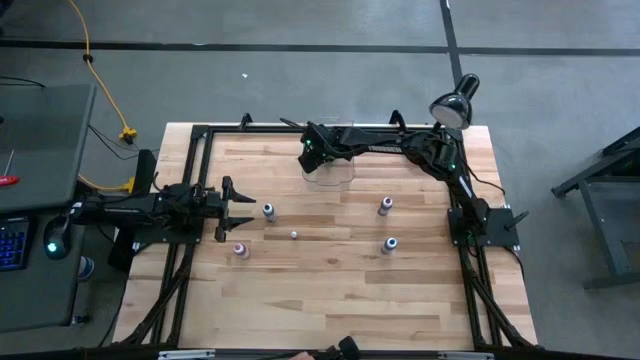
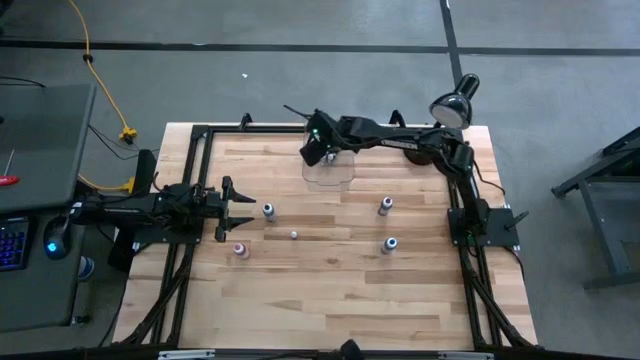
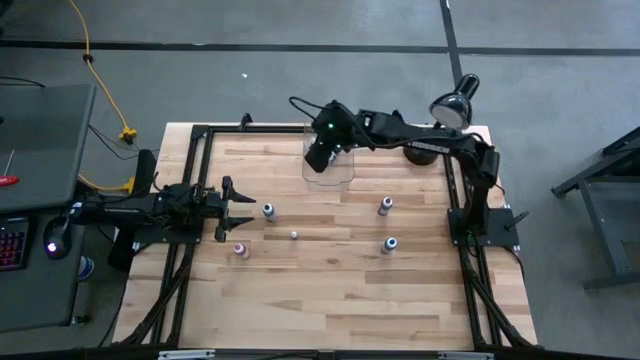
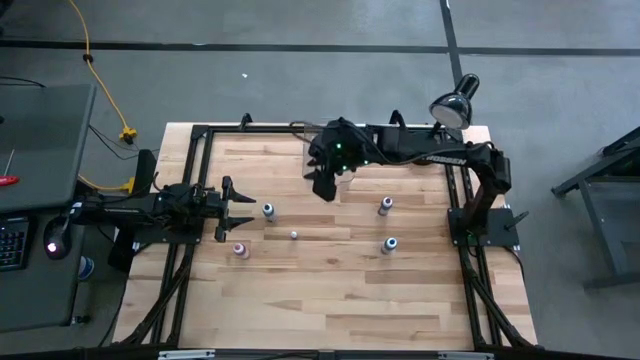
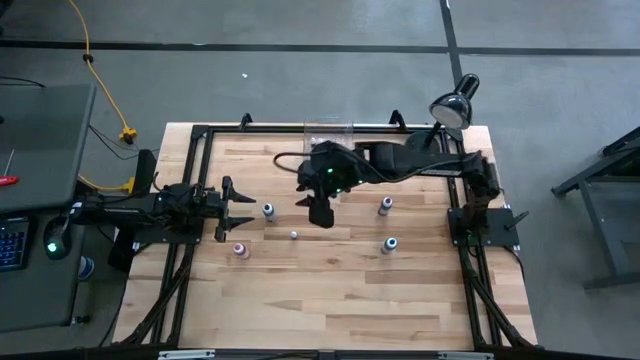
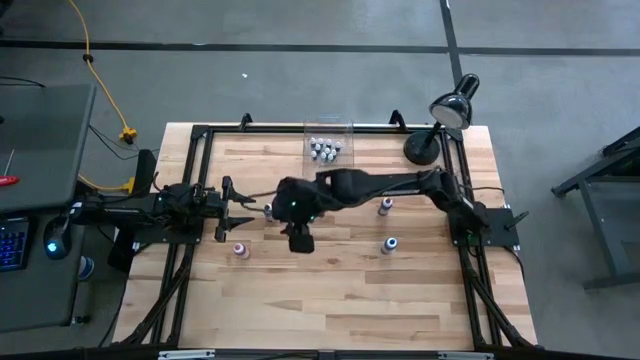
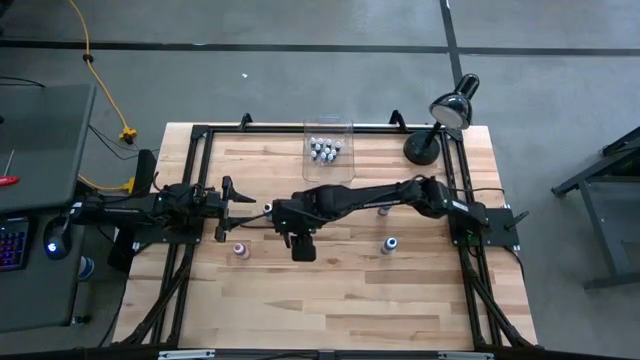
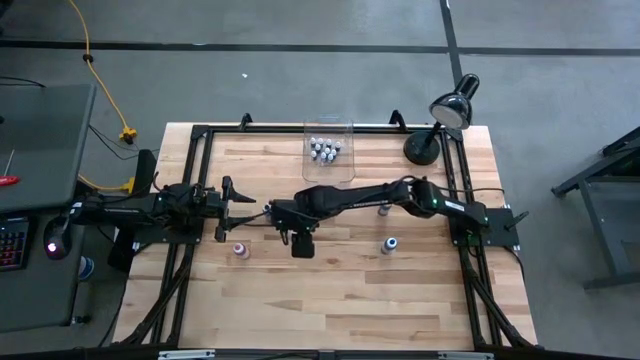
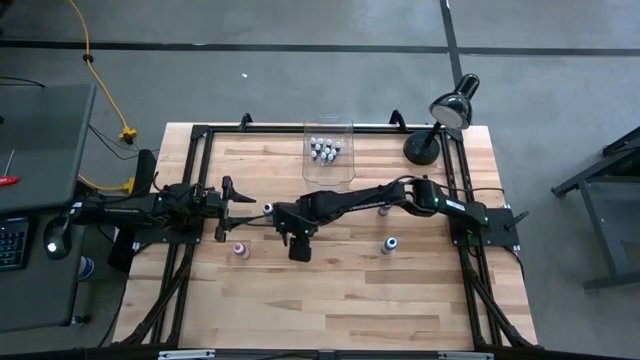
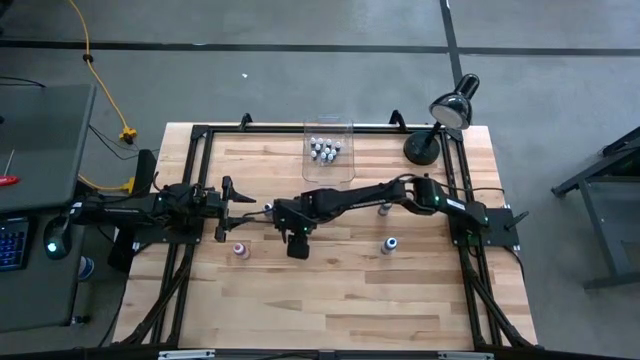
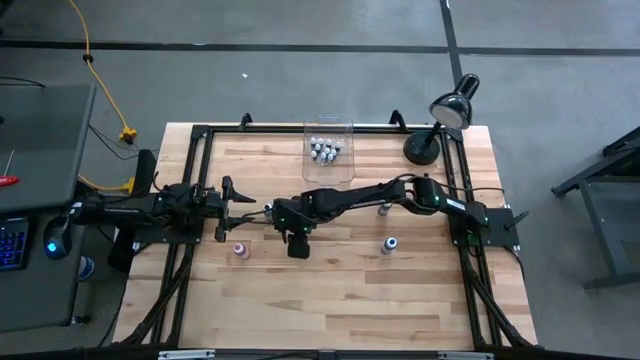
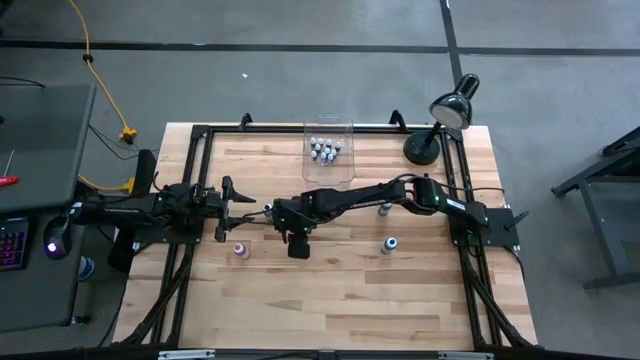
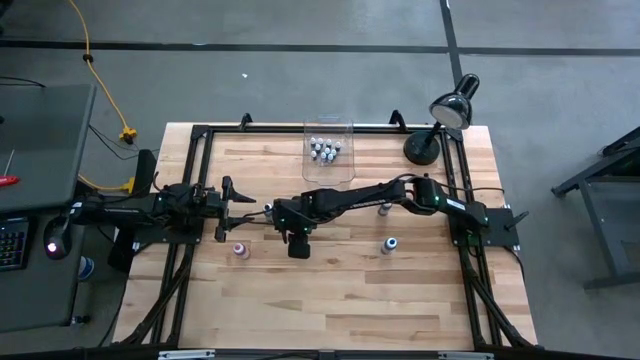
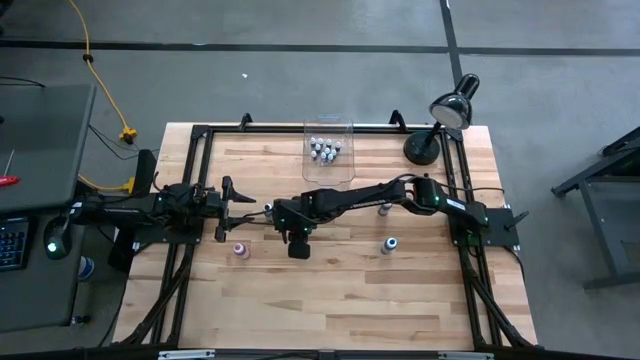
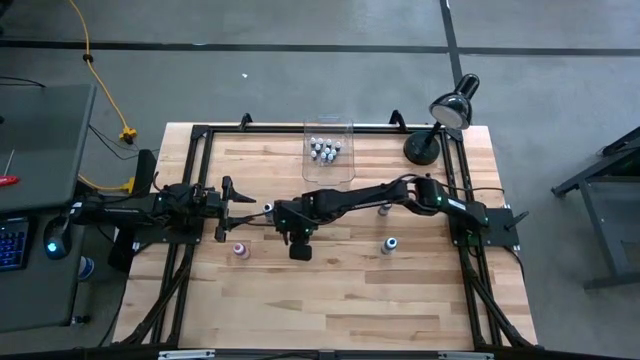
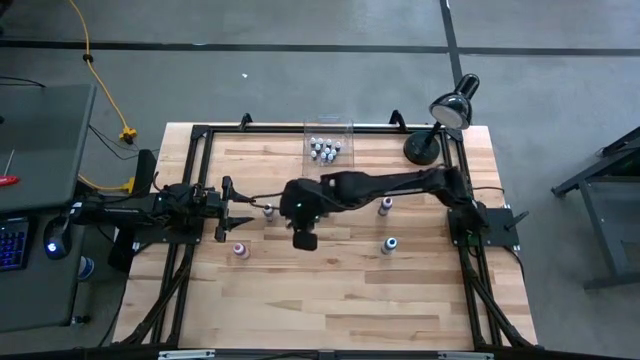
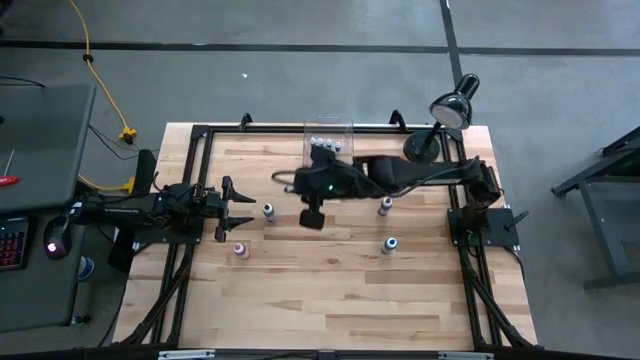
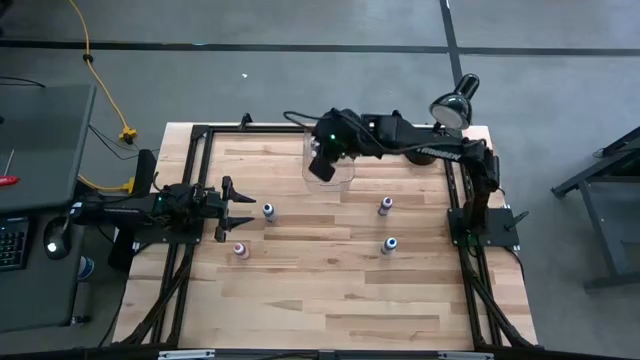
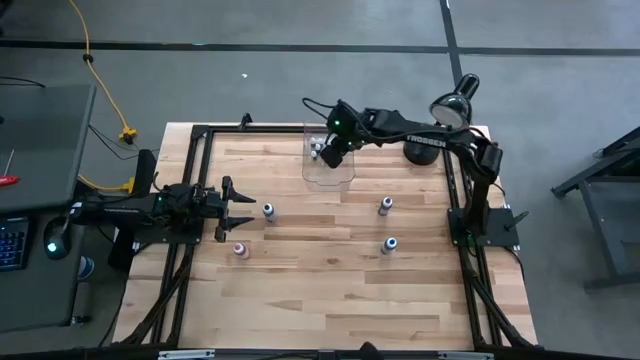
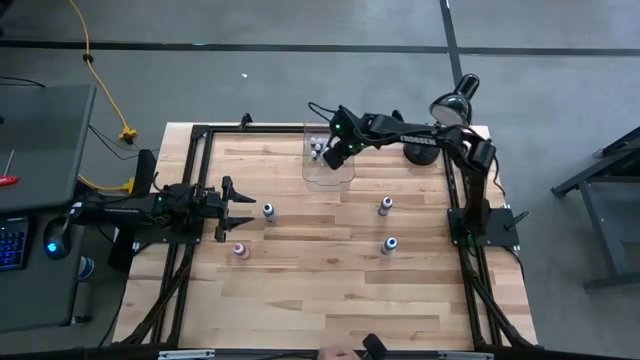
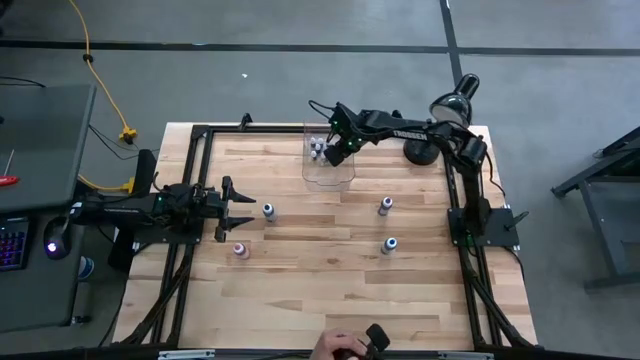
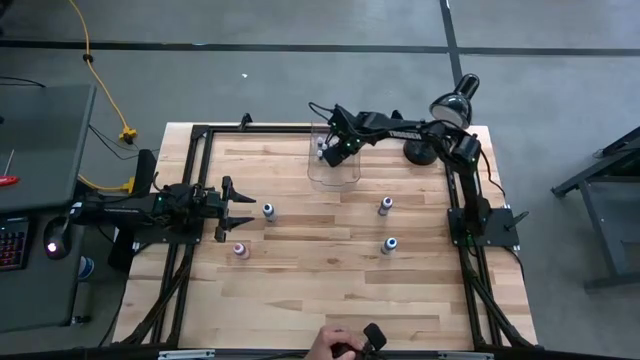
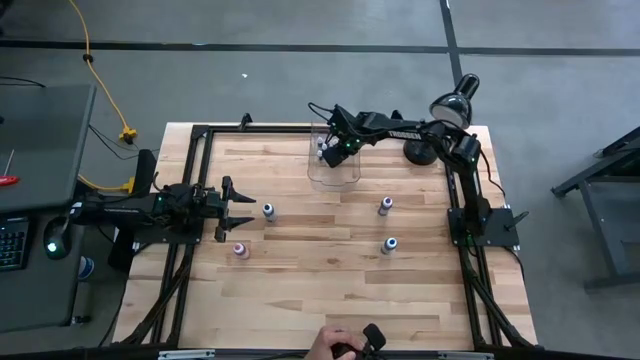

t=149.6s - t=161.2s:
Task: Pick & Place food coloring
Put the small food coloring bottle into the transparent bin

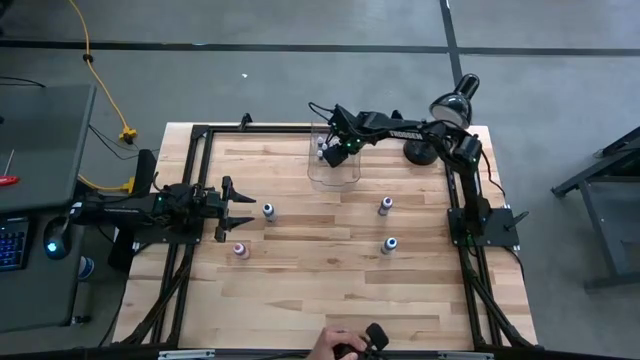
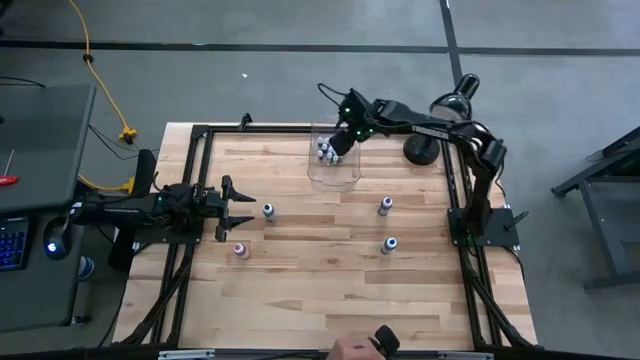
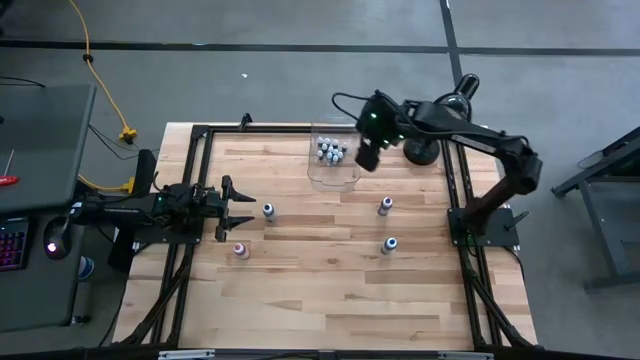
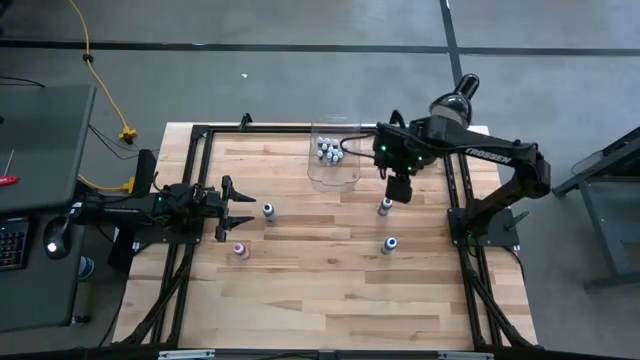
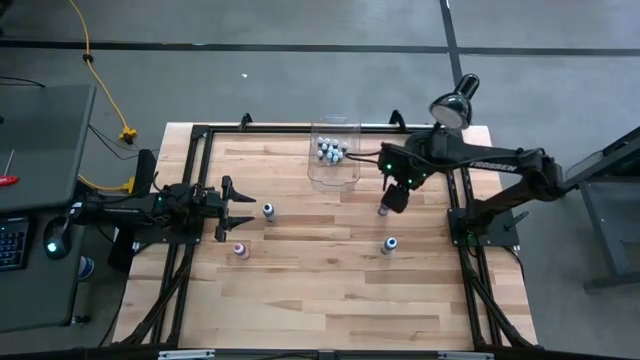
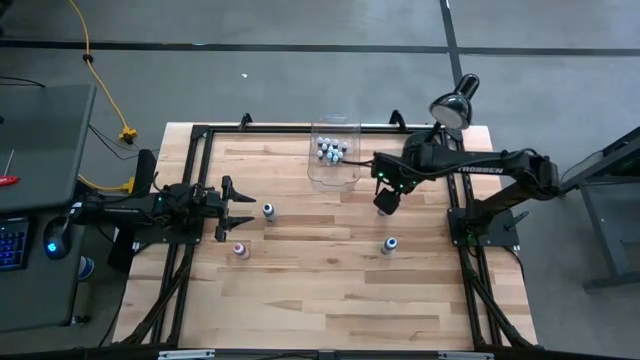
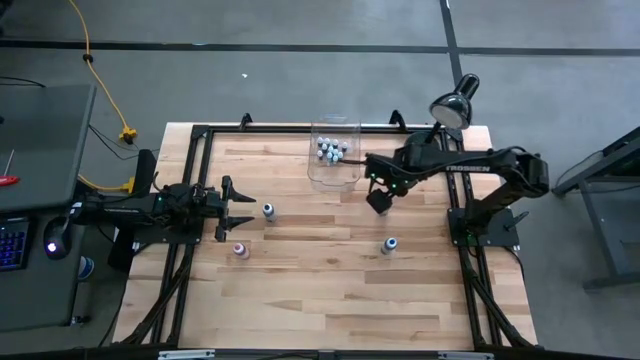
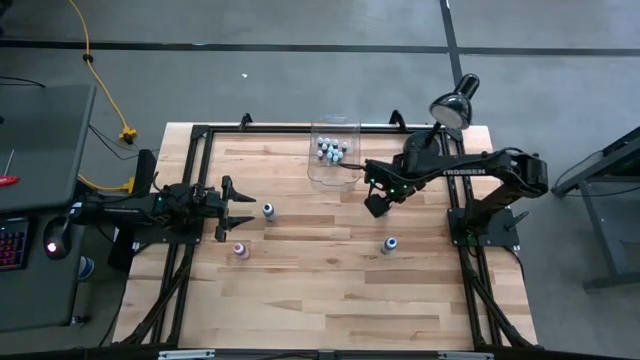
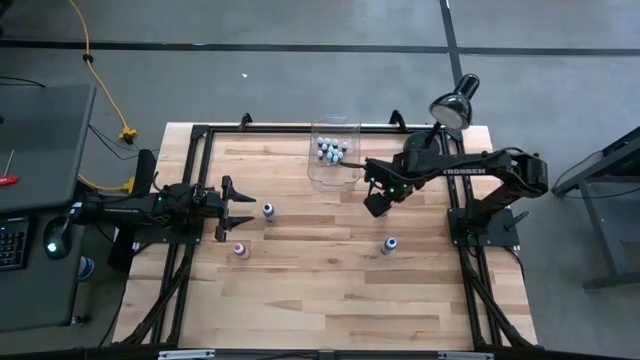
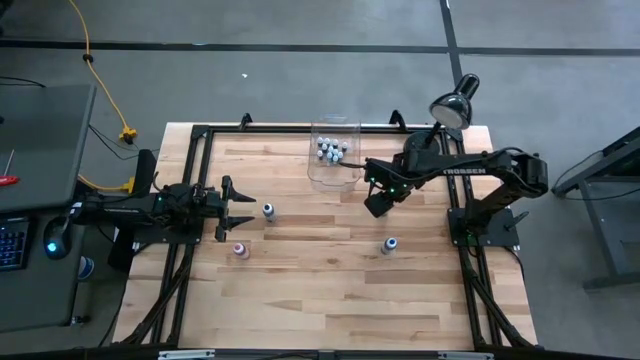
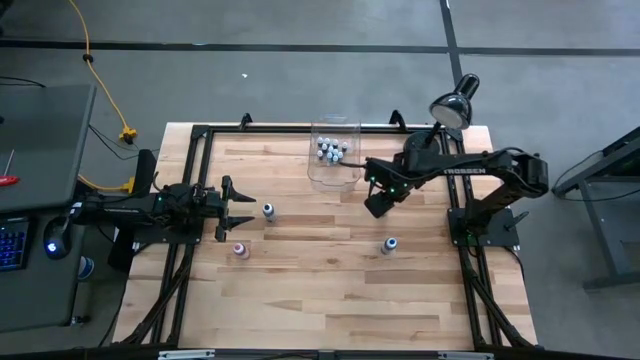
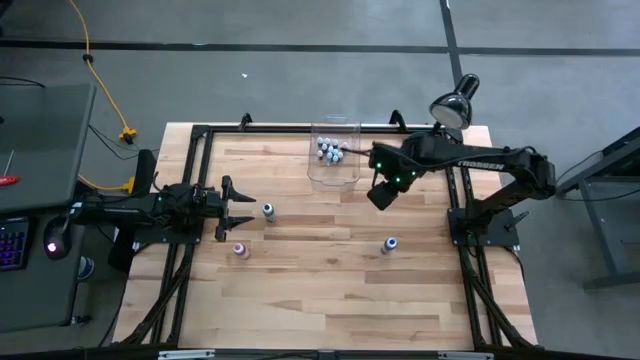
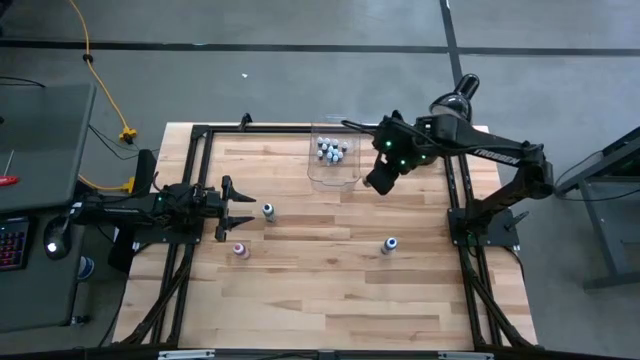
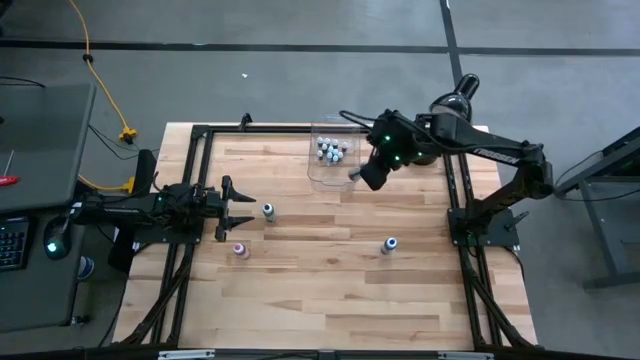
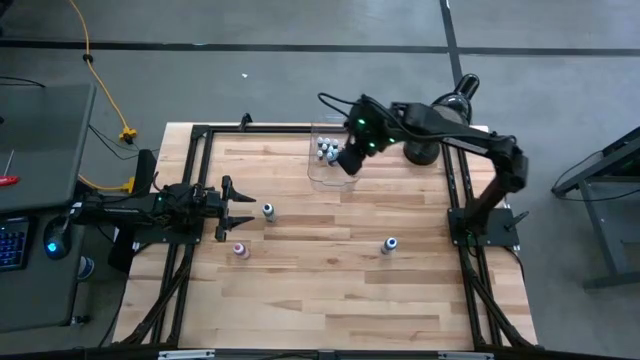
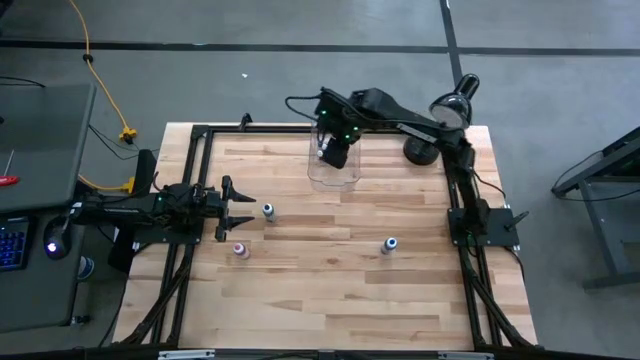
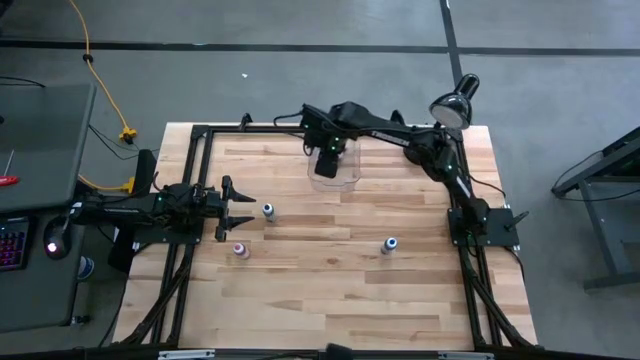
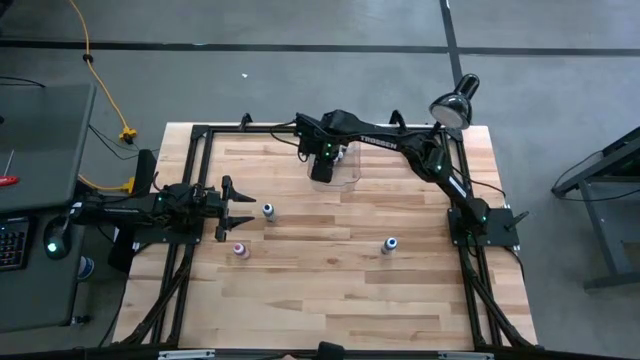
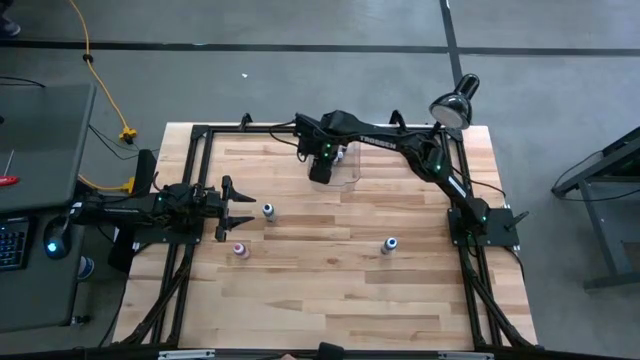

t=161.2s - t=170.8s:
Put the big purple food coloring bottle into the transparent bin

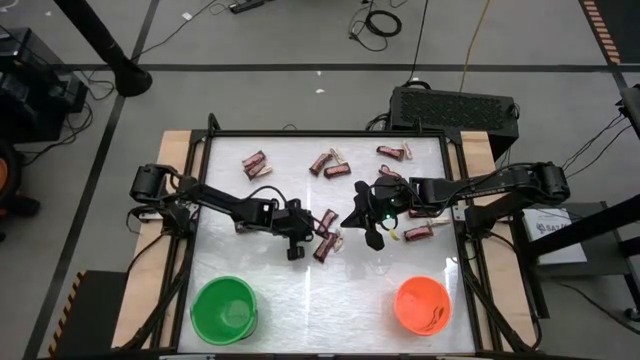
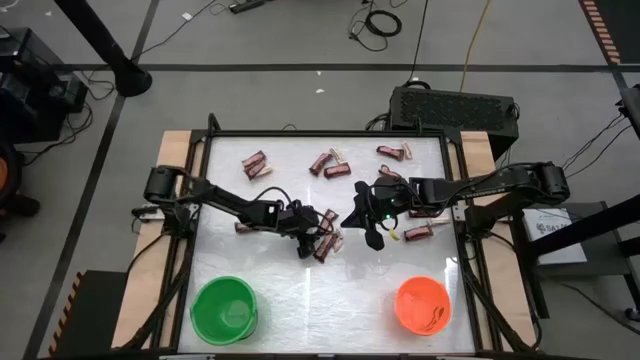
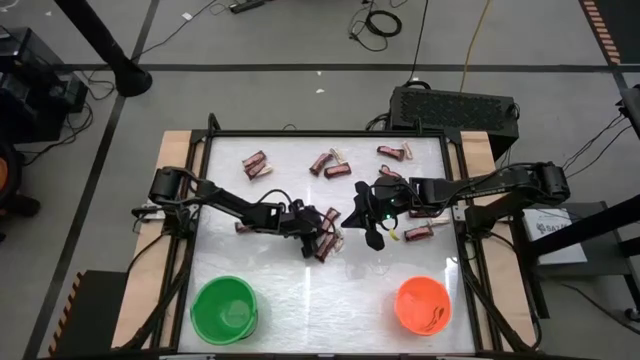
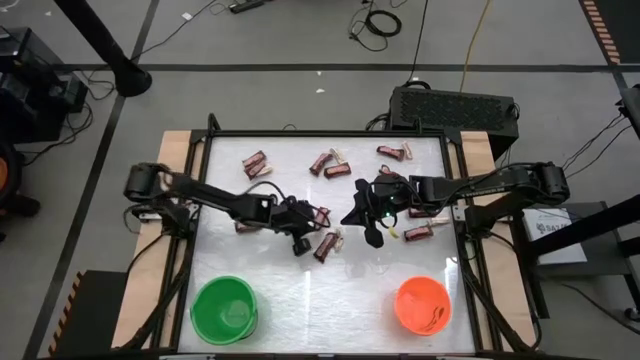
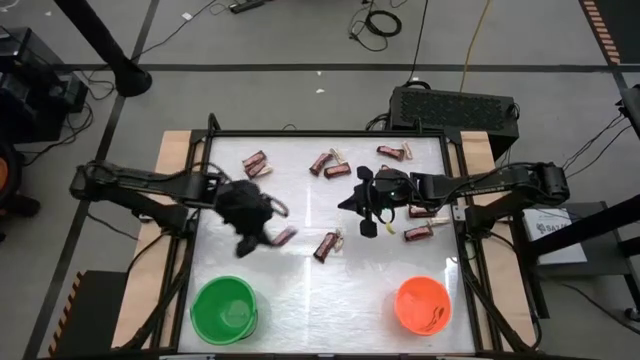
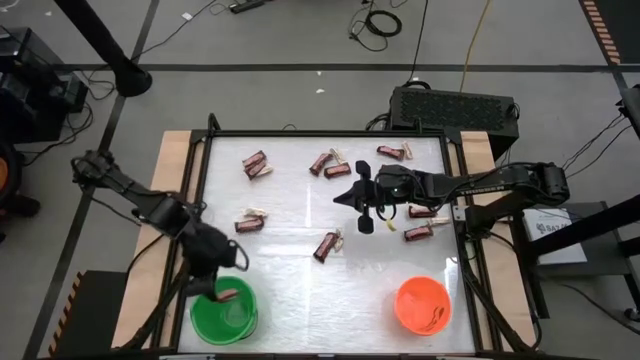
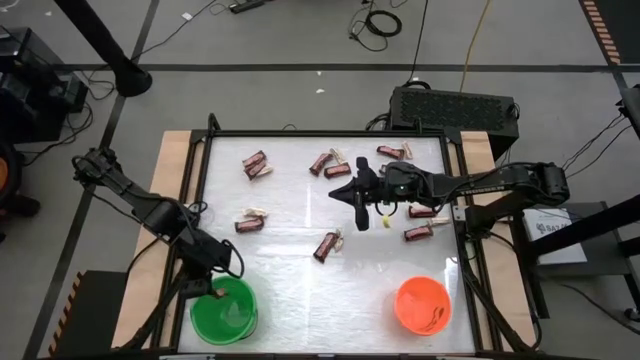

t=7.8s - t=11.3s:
Task: Sort candy by brand, put in halloween buckets
Put the brown chocolate bar into the green bucket
